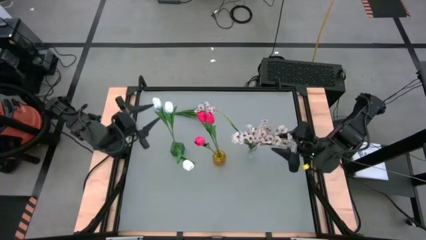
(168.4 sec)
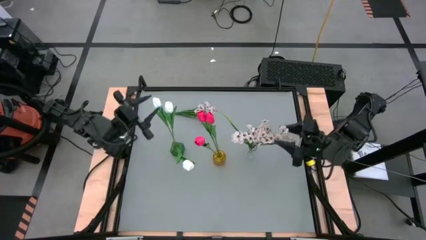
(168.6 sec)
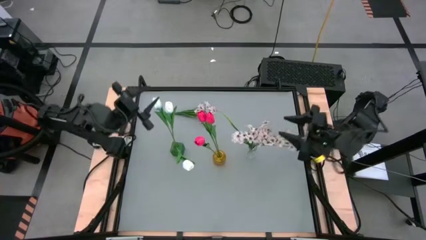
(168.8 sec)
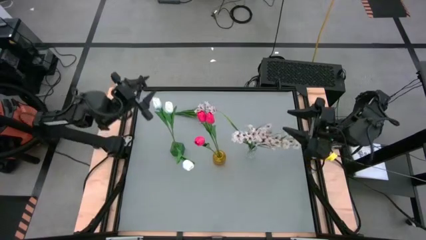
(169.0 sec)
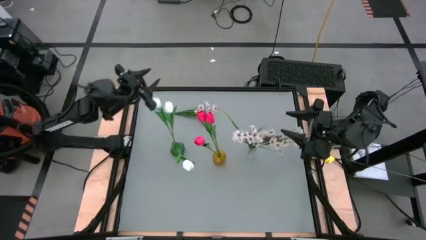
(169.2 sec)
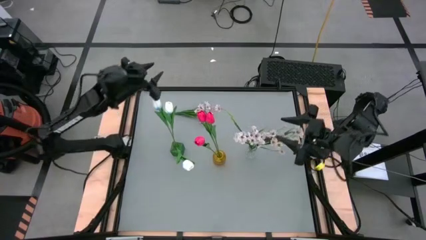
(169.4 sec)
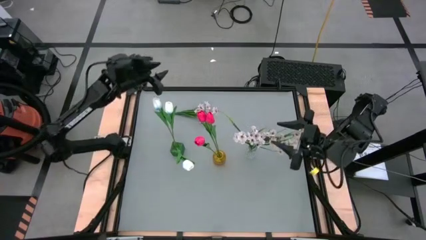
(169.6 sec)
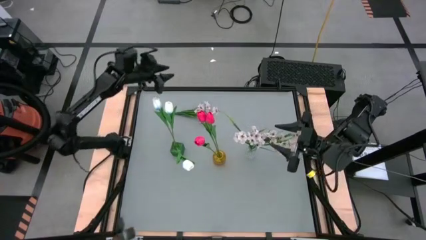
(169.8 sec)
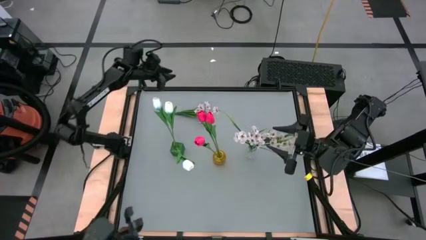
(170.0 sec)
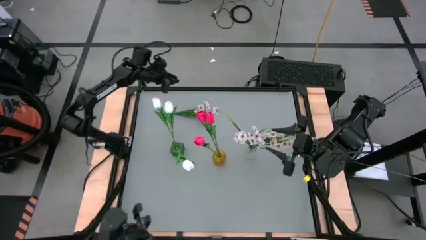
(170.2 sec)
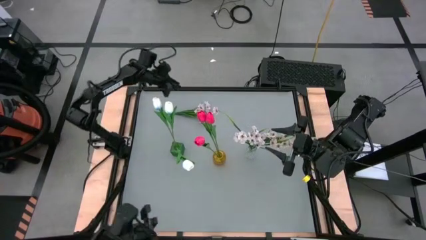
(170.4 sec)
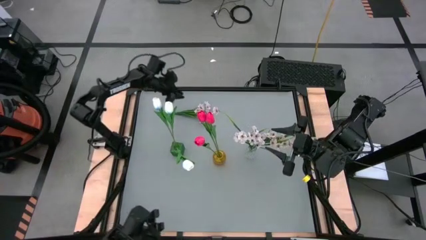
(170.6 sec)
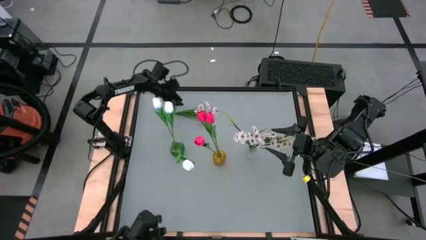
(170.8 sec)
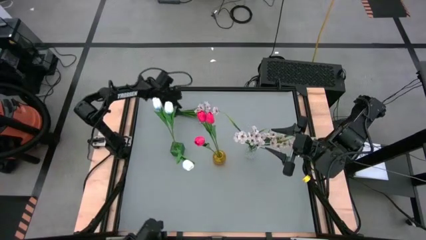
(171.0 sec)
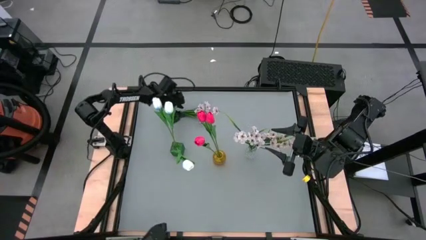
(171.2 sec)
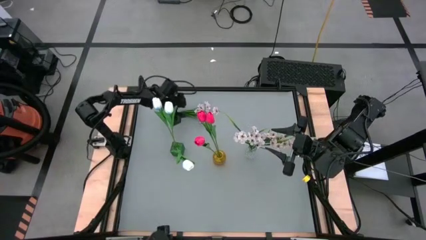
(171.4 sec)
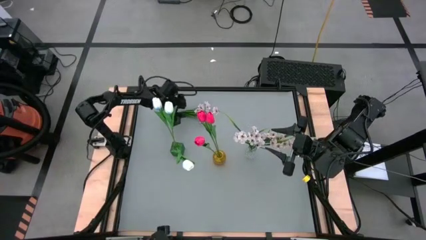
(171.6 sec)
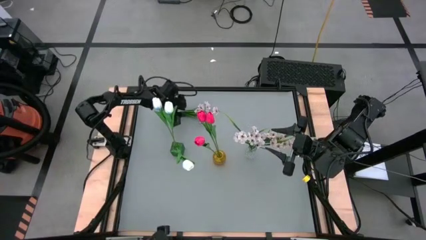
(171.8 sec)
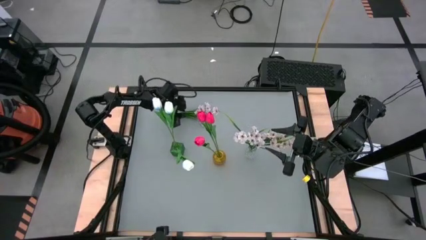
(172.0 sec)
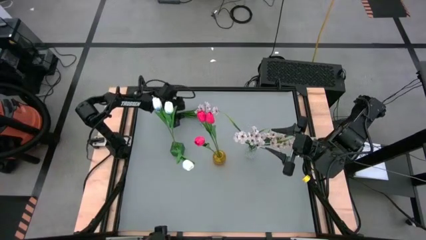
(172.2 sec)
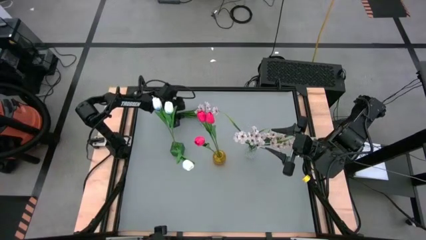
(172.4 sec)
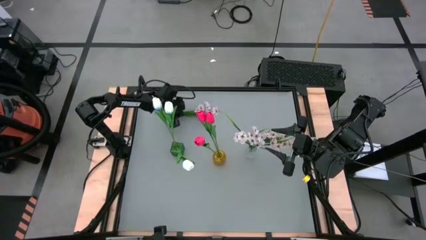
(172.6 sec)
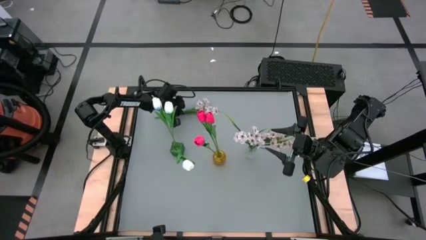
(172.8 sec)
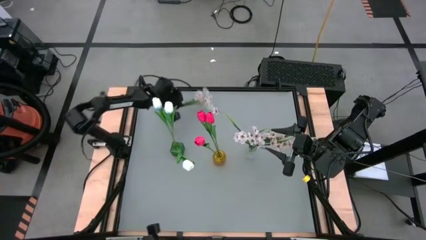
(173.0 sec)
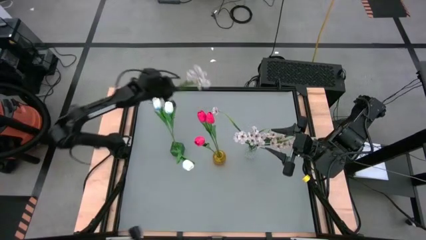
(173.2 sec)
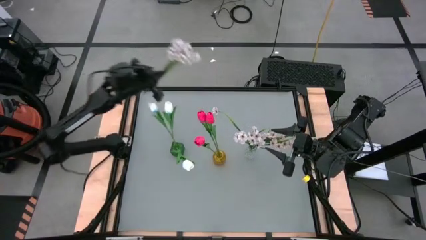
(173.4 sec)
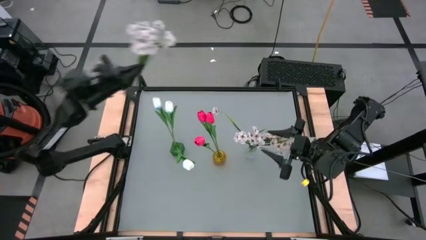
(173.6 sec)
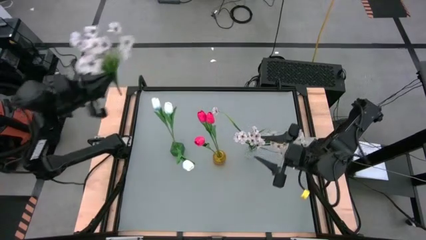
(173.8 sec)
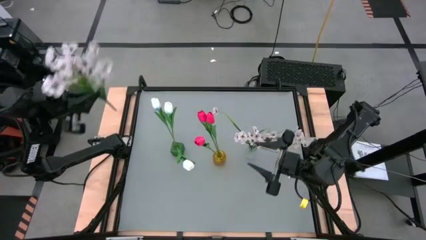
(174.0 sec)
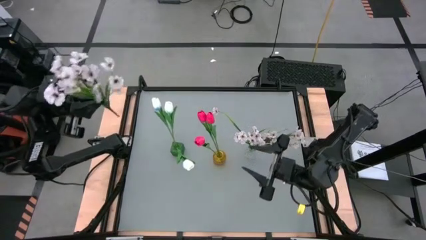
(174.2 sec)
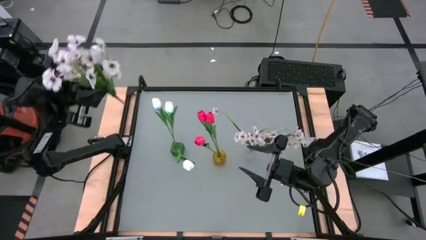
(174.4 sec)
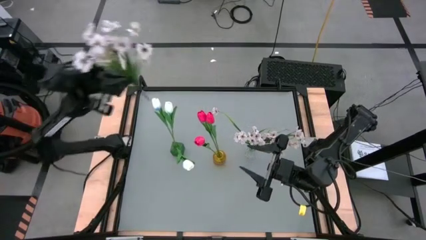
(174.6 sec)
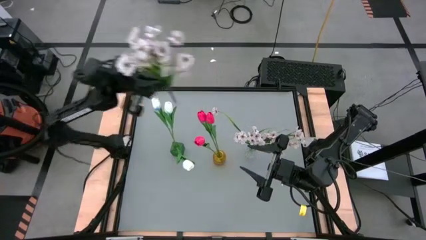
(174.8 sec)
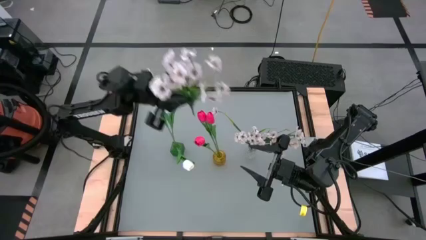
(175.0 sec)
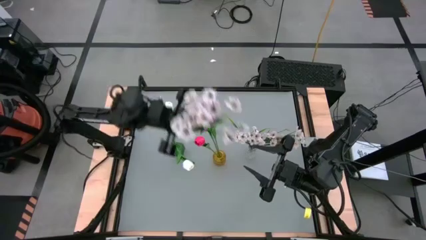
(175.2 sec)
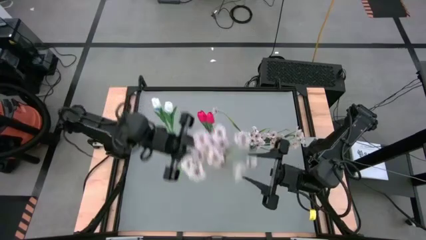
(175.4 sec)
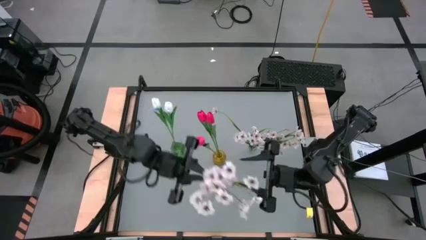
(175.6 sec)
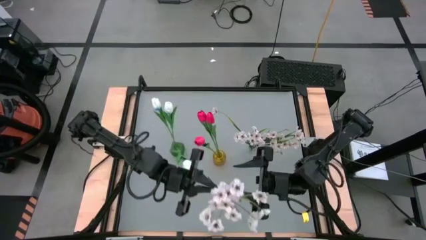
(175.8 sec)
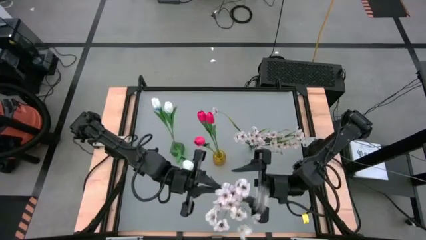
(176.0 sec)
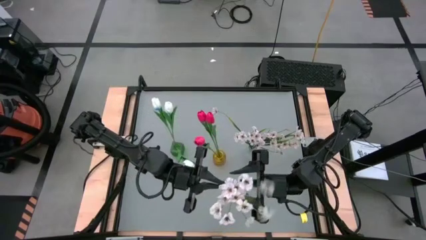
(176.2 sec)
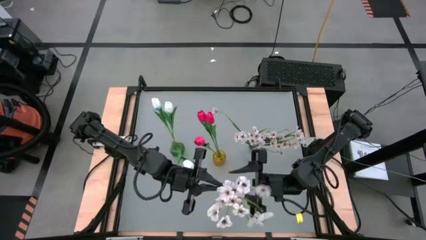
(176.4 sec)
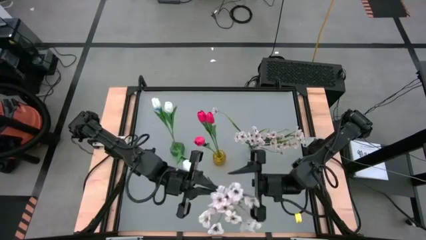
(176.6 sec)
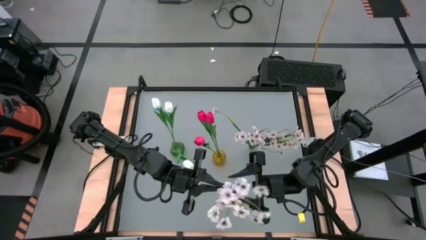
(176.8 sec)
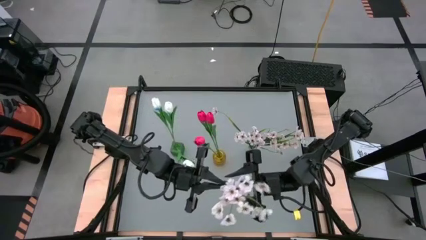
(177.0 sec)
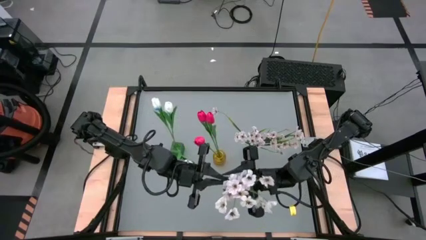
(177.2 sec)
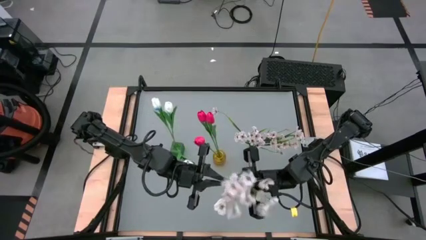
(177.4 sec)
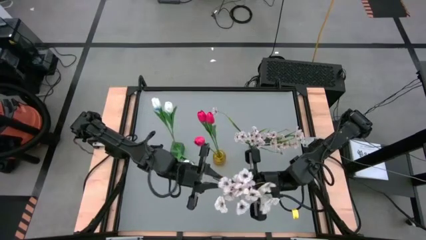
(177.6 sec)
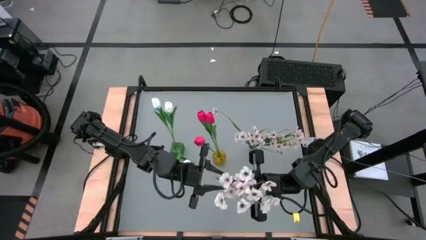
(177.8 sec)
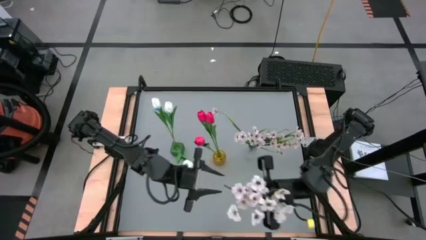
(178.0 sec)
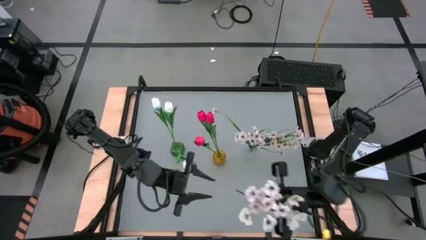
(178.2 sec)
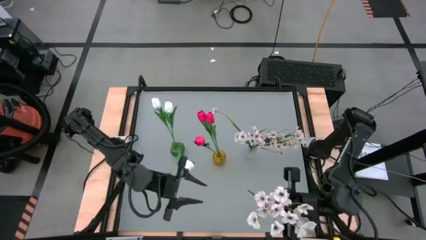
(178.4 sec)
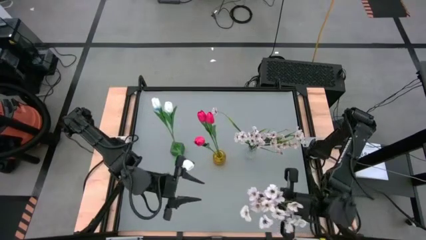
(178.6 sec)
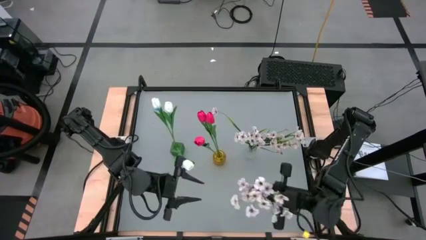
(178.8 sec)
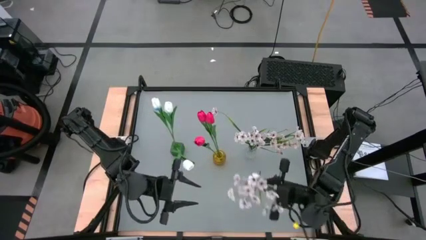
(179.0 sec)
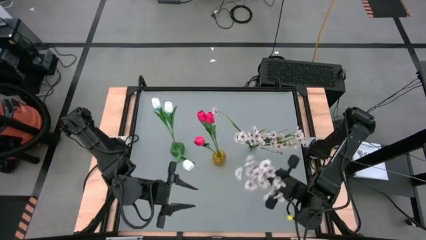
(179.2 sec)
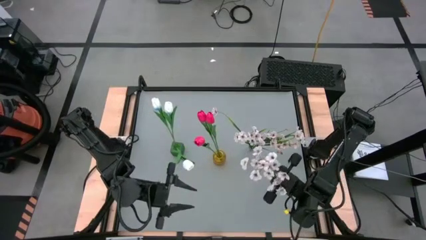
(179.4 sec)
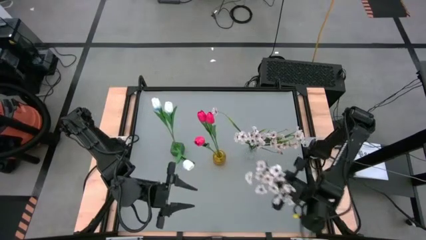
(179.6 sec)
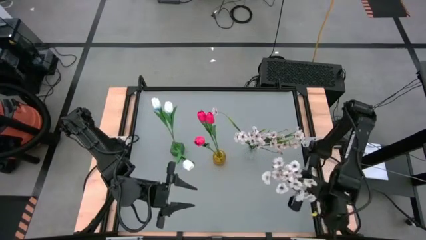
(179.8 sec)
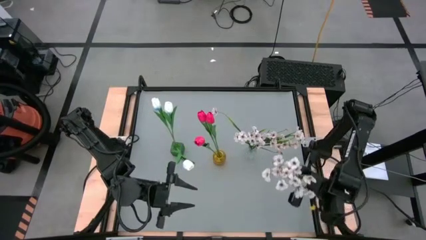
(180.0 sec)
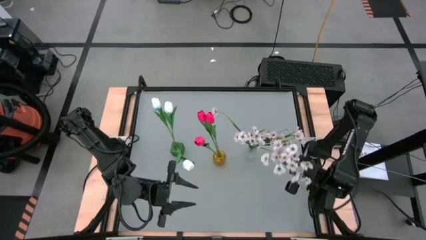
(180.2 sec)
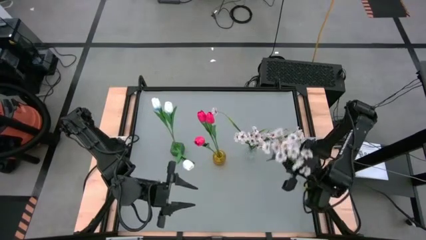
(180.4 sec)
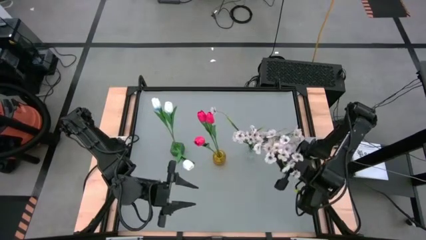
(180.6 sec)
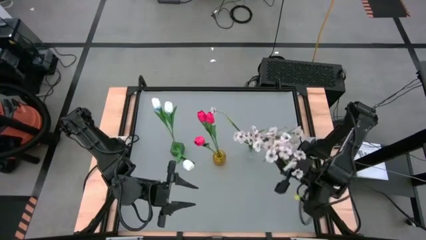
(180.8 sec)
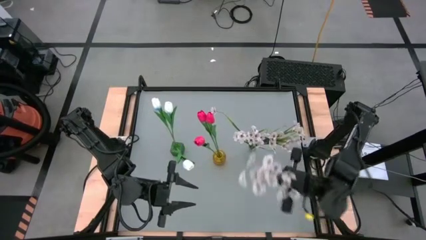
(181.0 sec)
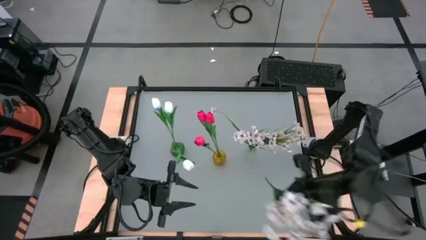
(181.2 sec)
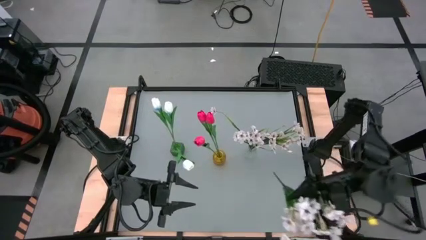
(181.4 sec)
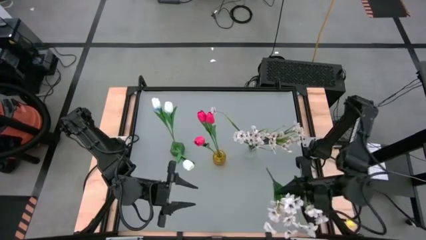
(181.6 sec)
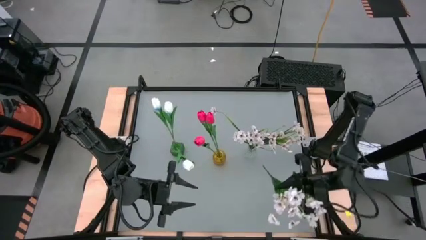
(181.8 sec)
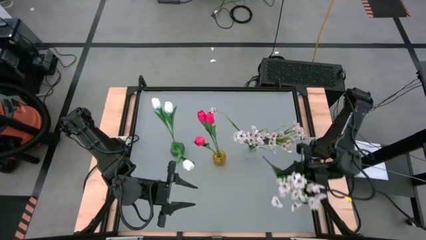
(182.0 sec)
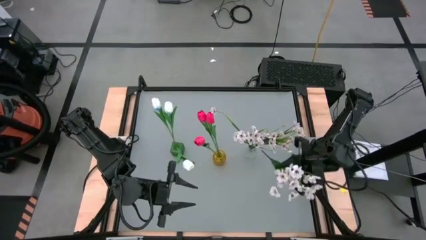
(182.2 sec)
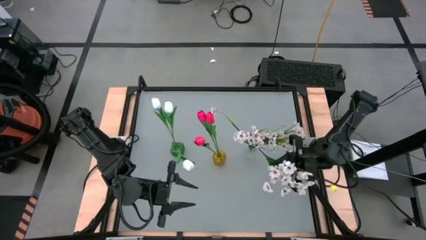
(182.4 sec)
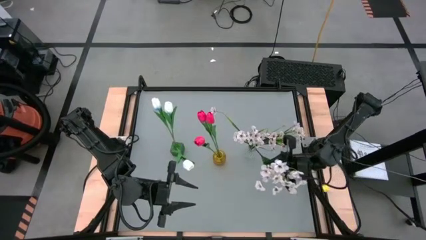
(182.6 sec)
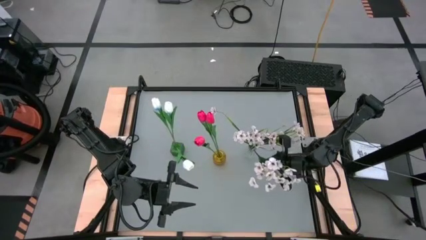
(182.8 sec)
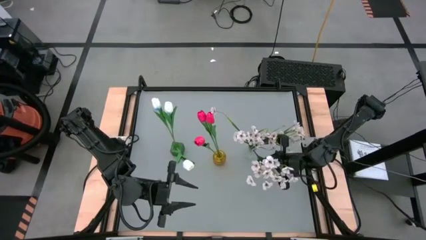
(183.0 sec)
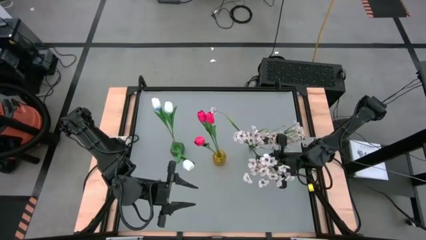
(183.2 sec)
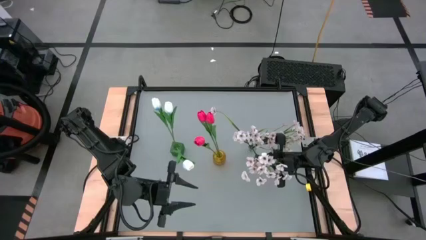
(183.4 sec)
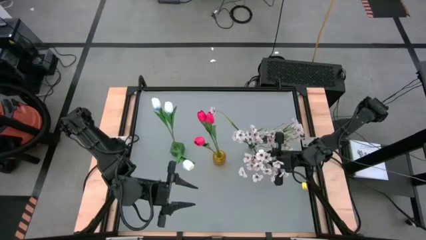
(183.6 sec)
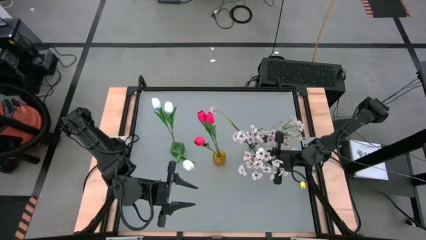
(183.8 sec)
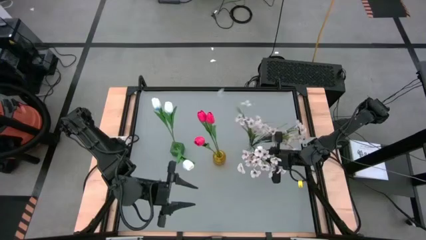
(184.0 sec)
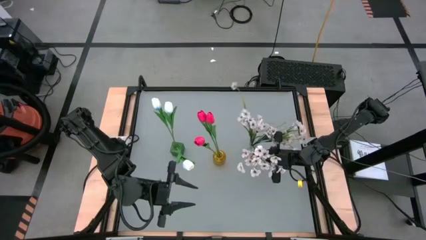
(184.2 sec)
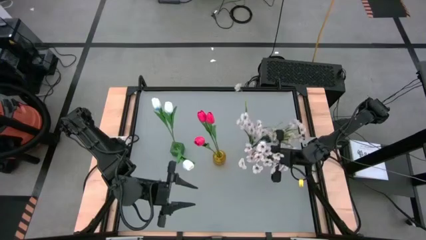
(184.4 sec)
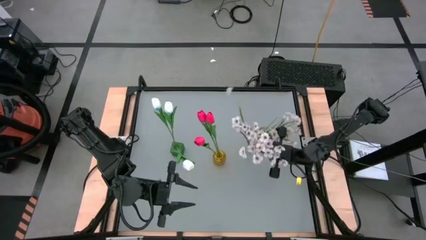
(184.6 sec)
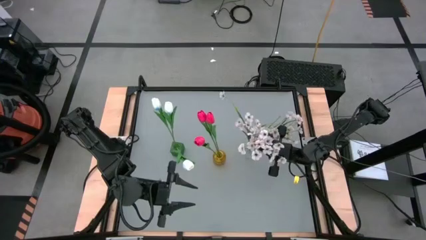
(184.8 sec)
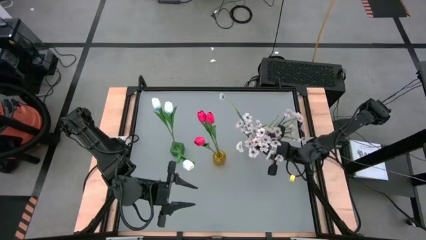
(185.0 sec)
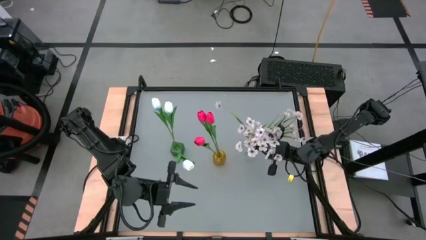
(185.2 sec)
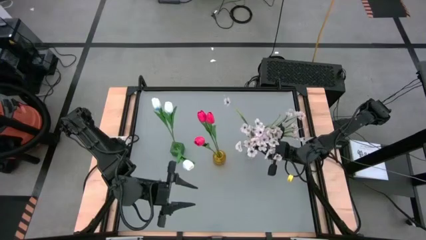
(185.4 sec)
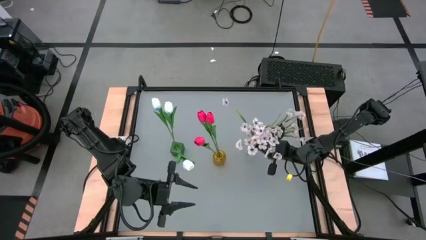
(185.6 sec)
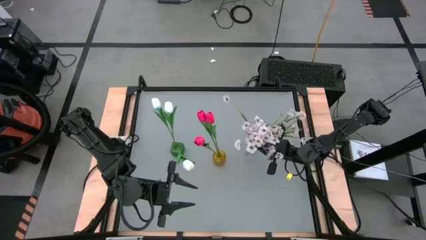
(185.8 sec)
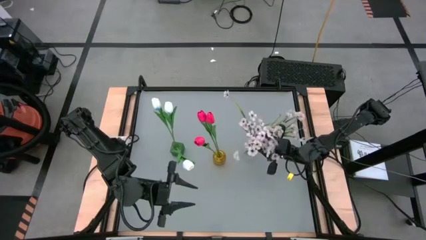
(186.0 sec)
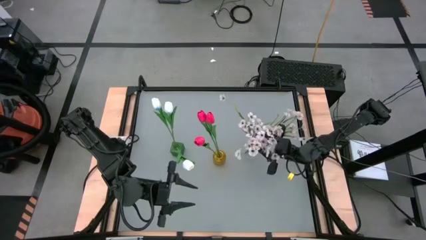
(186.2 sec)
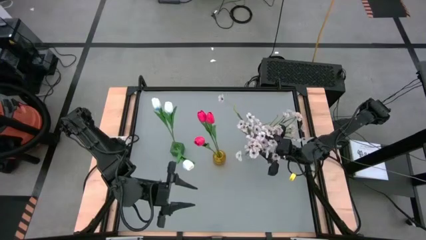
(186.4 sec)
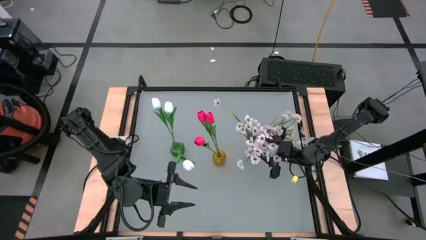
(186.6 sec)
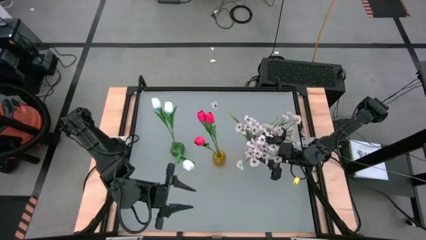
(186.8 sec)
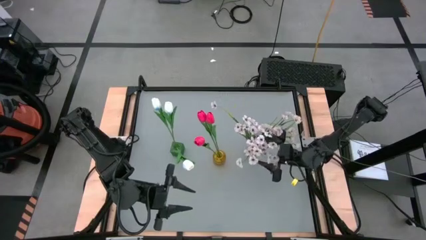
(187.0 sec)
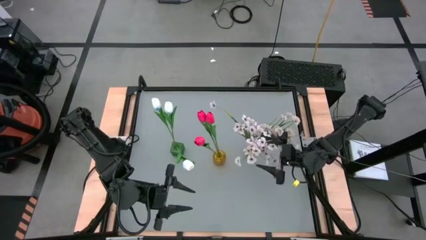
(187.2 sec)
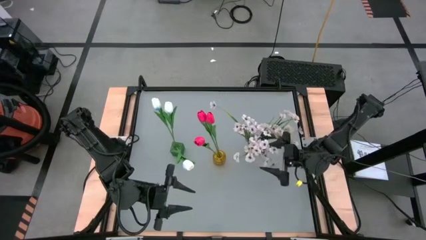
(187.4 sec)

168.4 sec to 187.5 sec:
Task: Sort flowers into vase by color
Put the white flowers into the transparent flower vase
